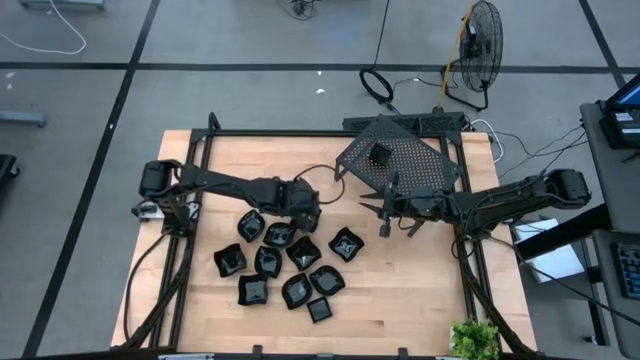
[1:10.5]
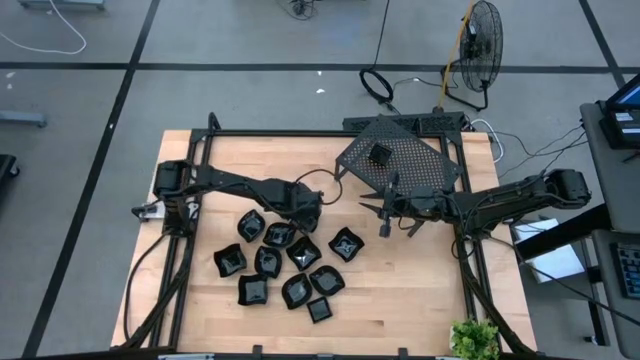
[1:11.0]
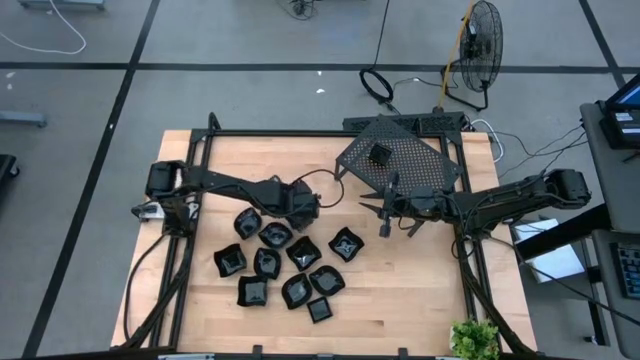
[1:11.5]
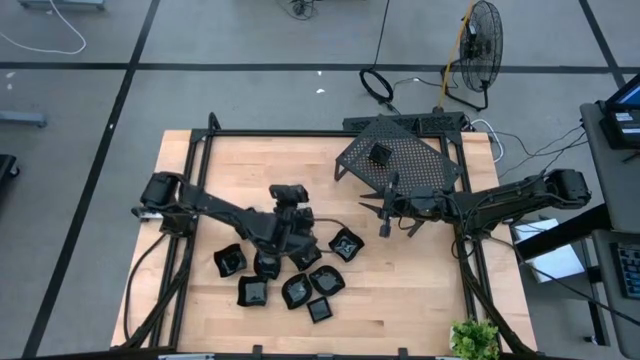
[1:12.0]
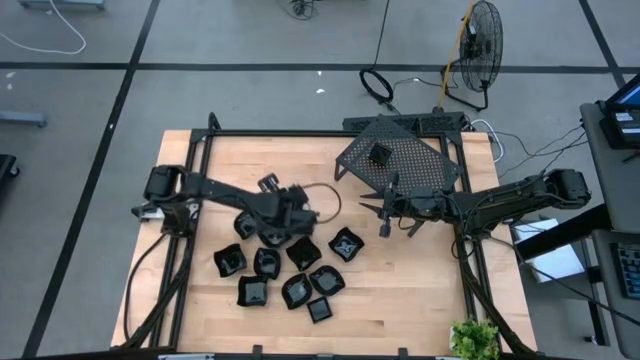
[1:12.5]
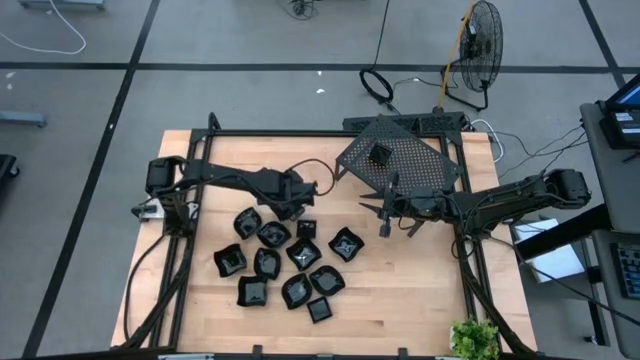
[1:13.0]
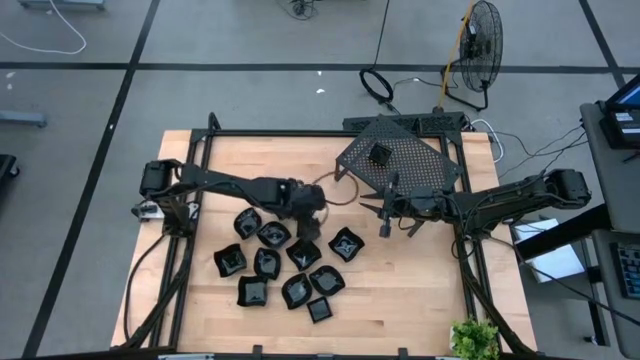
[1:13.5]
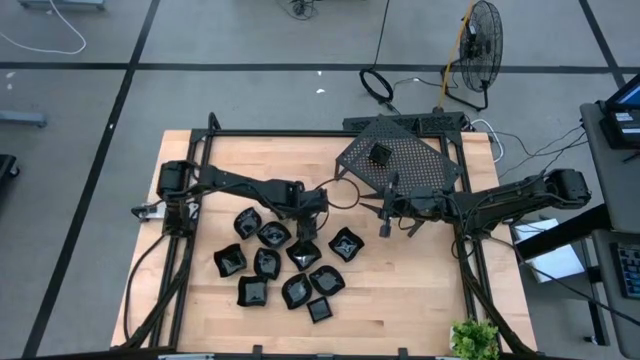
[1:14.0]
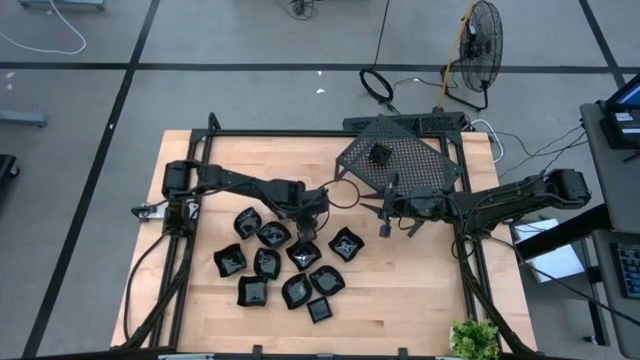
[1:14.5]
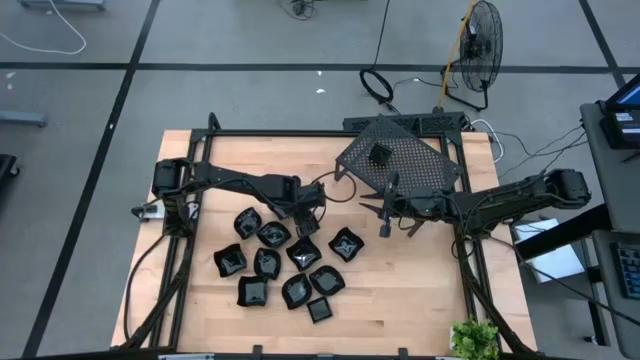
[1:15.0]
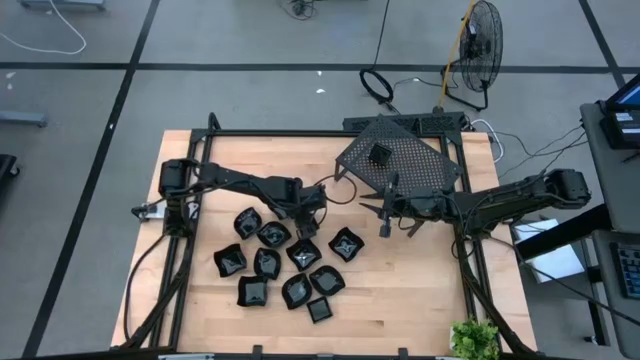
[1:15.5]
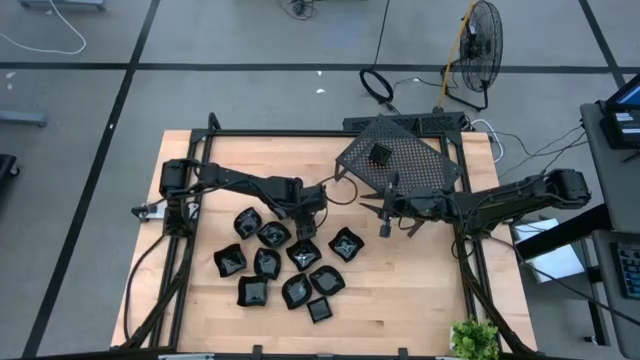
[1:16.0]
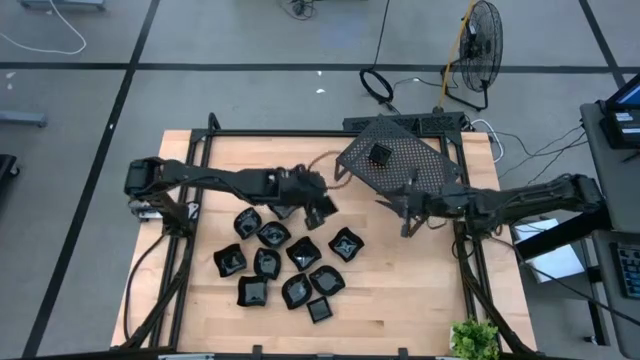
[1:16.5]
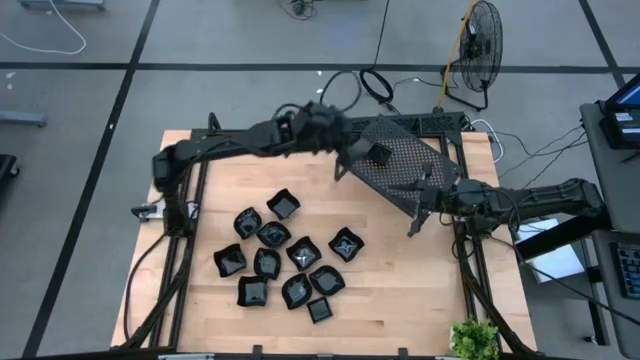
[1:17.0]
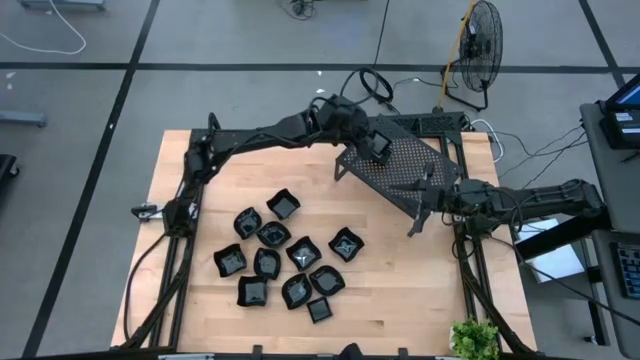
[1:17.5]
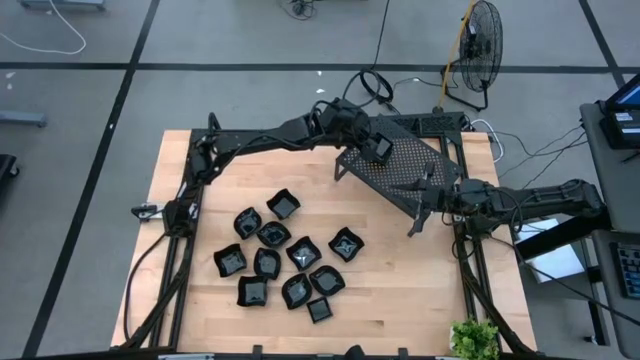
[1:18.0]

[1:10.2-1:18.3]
Task: Pick & Place Mini shaped plates
Stack the black square plate on the square black plate on the shelf

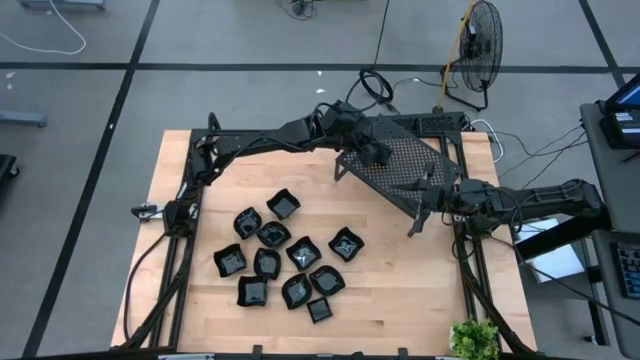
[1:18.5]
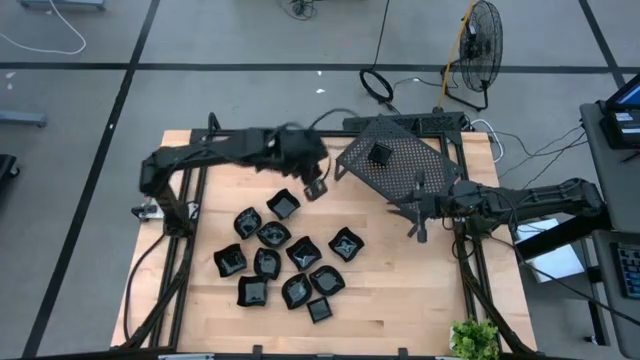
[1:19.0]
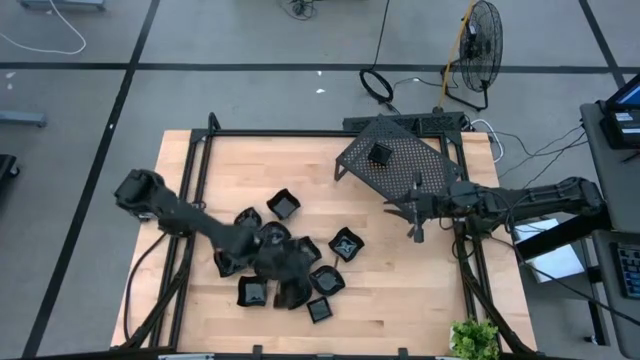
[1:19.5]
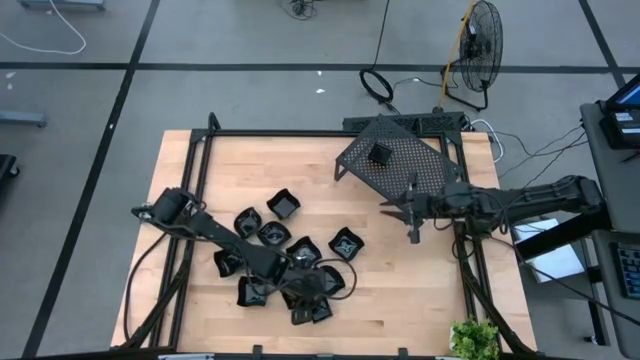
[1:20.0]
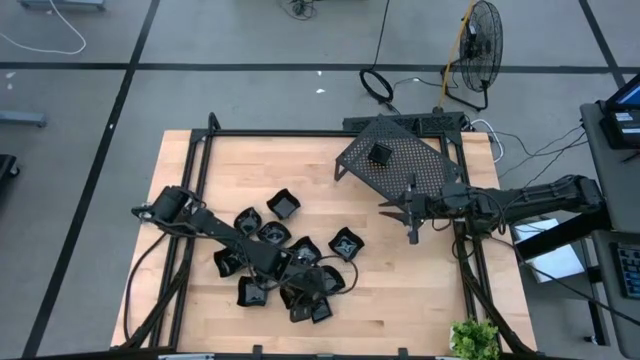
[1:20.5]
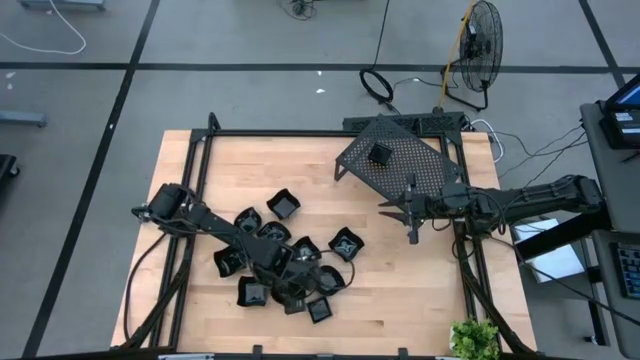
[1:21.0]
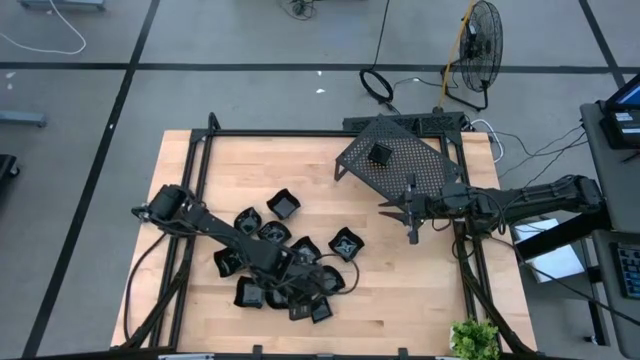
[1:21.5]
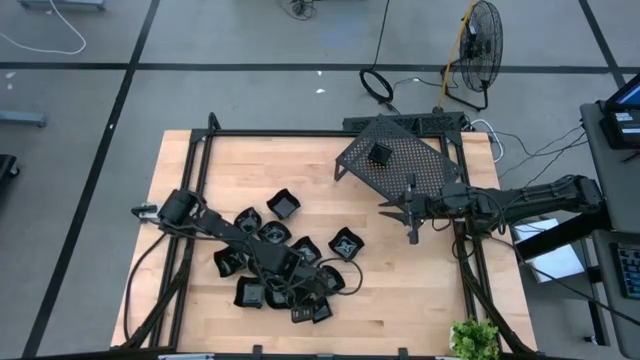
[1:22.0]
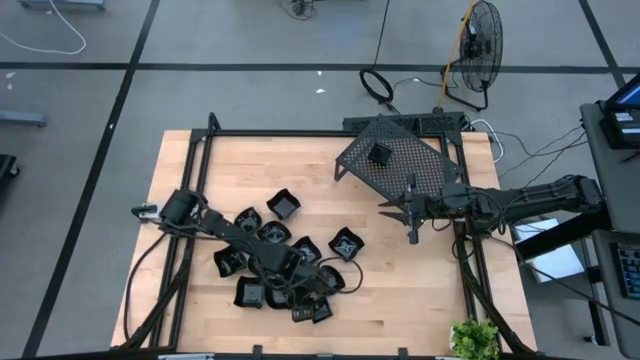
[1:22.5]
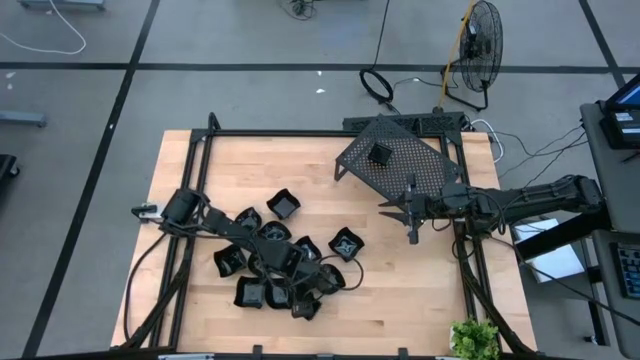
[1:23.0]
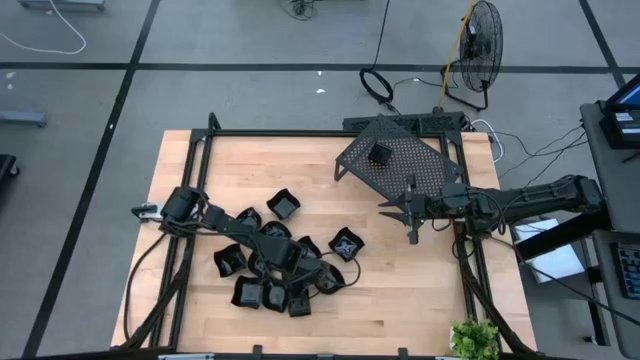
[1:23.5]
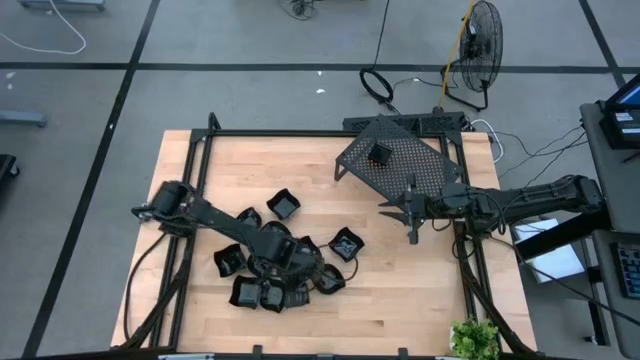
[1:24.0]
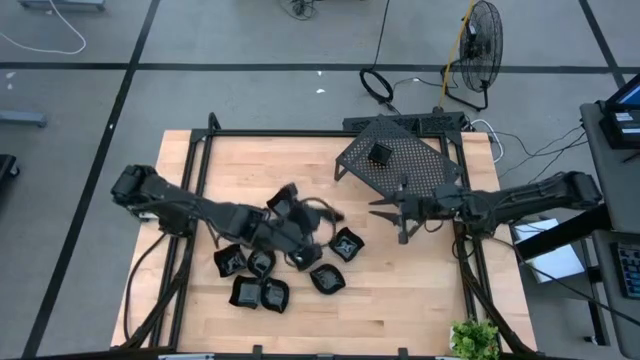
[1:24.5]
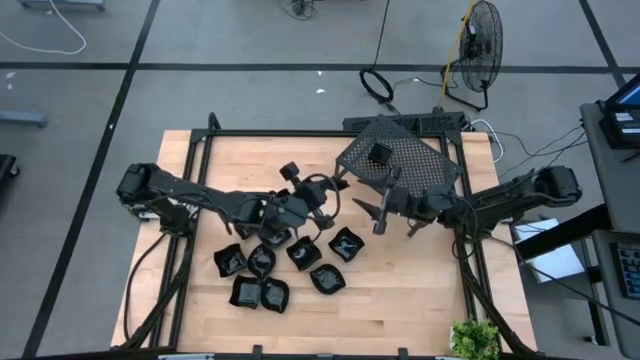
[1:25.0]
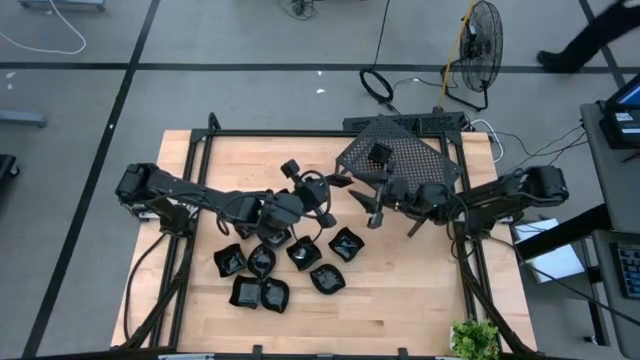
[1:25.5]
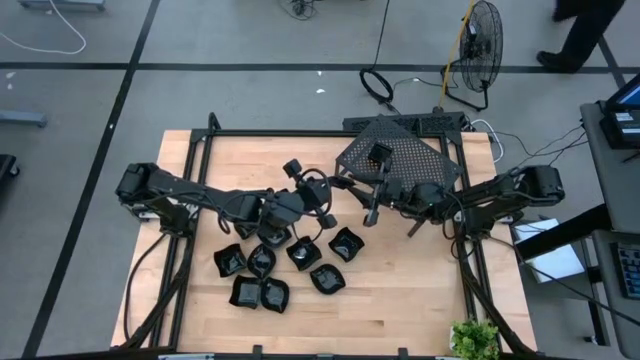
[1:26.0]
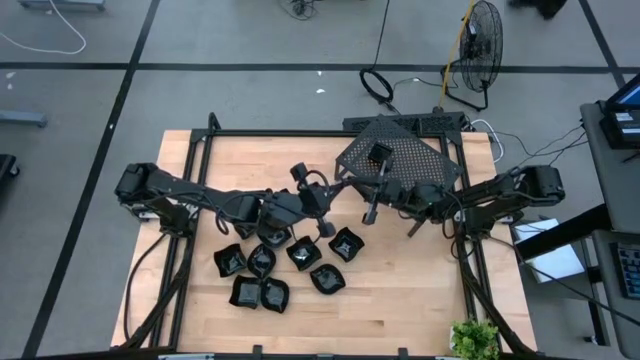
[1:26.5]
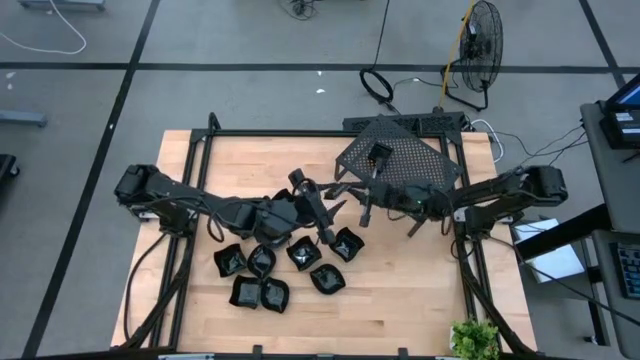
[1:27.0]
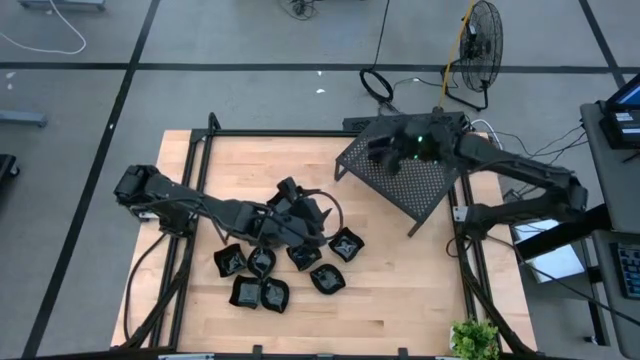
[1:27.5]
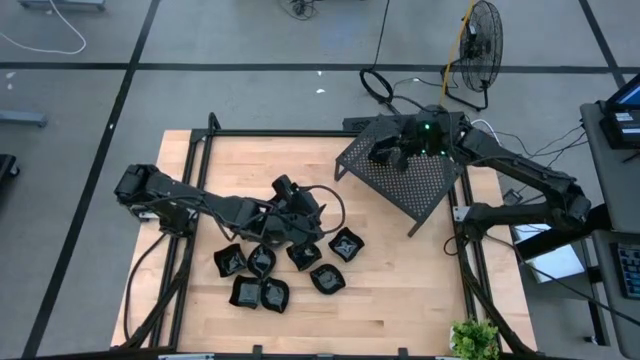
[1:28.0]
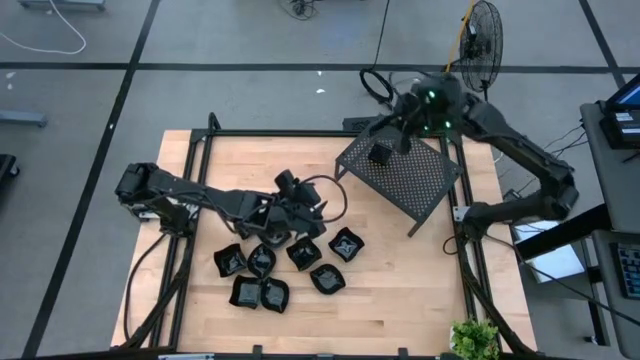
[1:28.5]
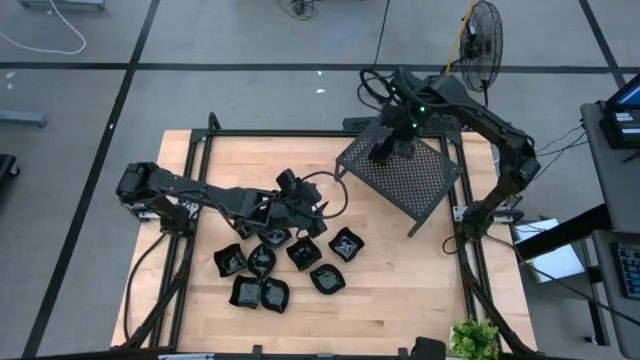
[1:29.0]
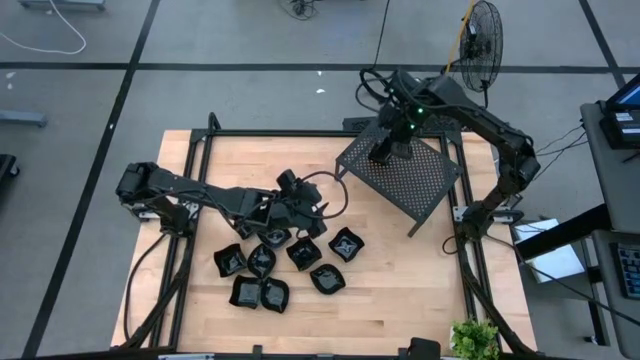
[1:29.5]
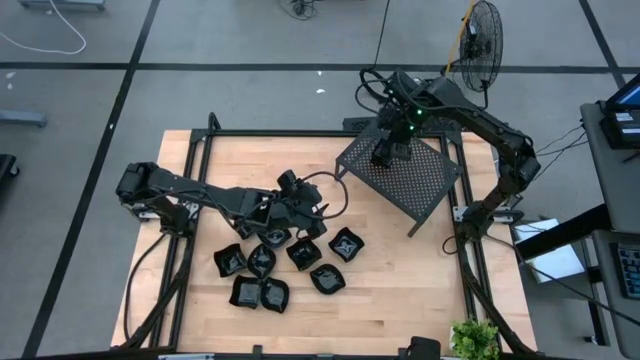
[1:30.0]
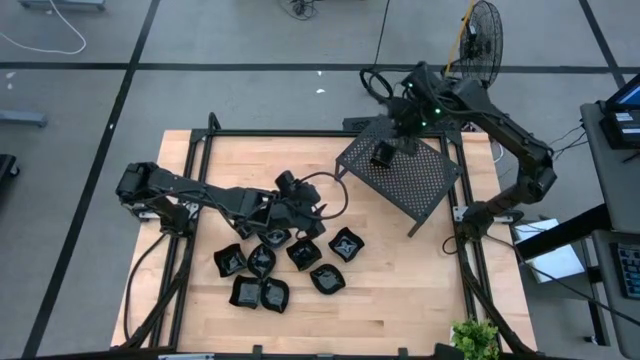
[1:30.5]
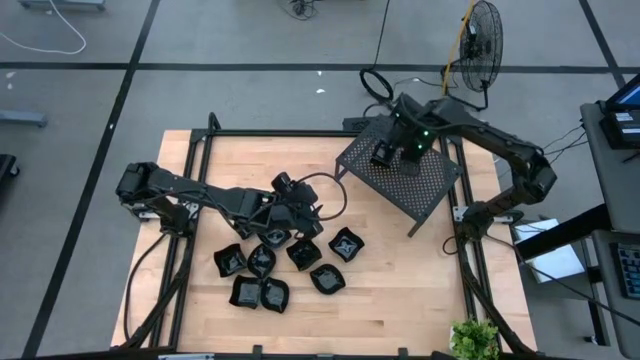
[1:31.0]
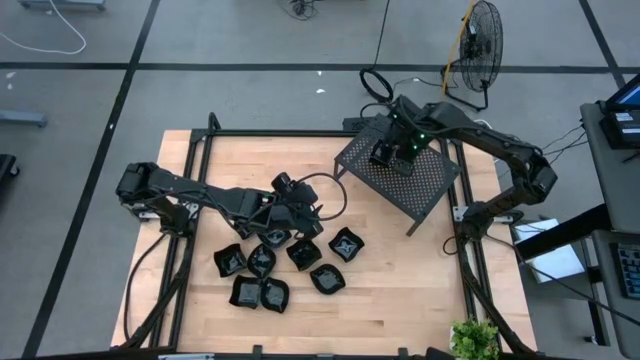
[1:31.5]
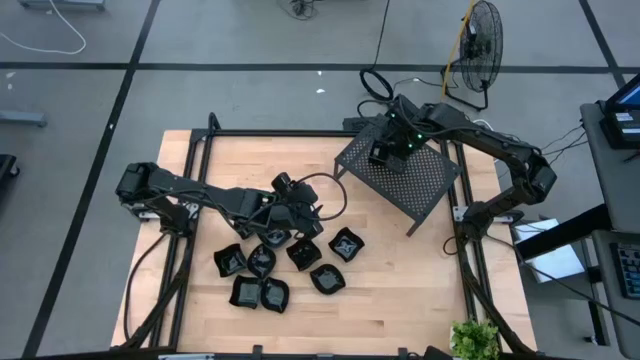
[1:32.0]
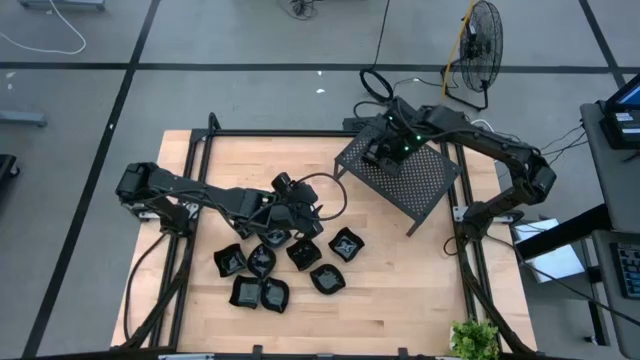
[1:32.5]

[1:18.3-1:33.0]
Stack the black square plate on the square black plate on the shelf
